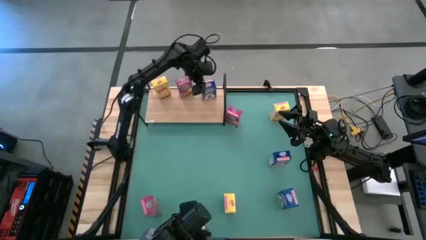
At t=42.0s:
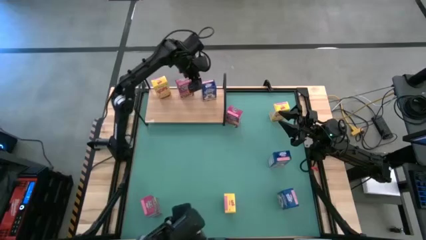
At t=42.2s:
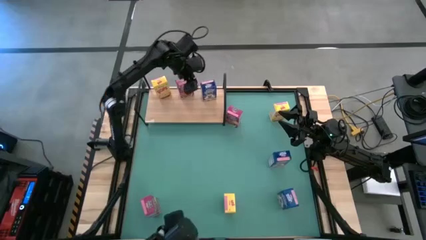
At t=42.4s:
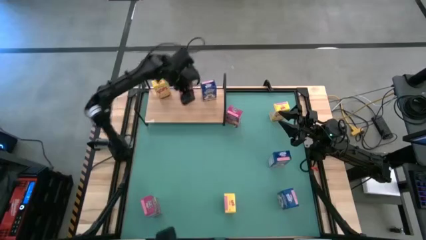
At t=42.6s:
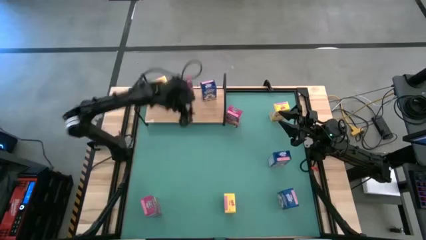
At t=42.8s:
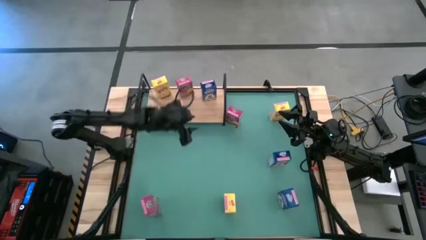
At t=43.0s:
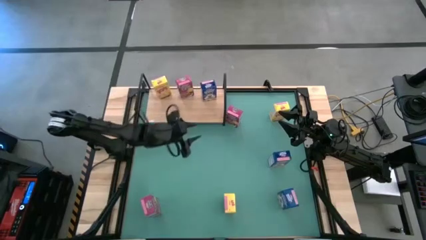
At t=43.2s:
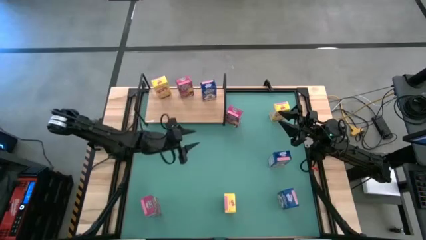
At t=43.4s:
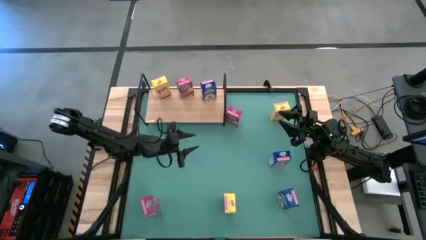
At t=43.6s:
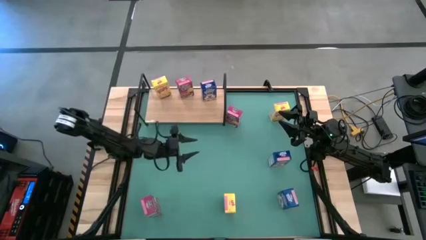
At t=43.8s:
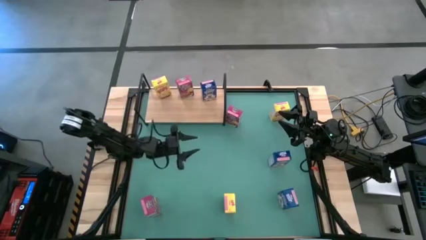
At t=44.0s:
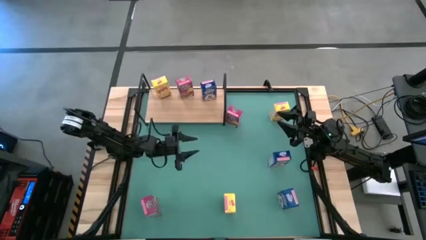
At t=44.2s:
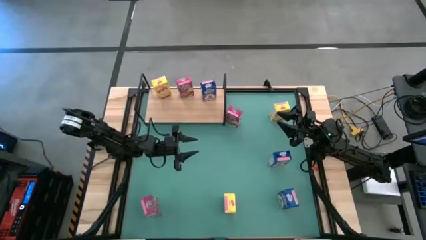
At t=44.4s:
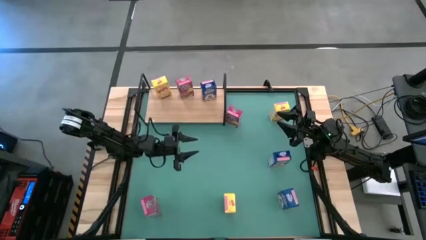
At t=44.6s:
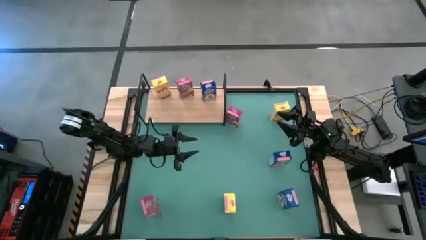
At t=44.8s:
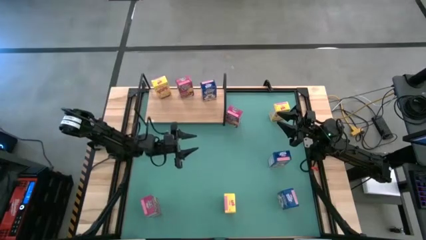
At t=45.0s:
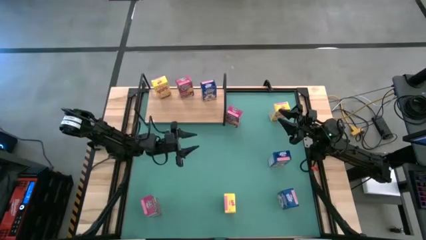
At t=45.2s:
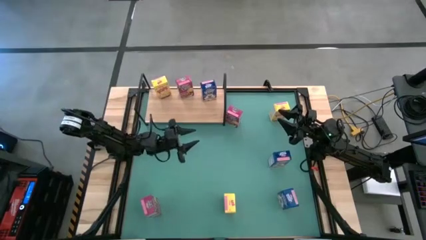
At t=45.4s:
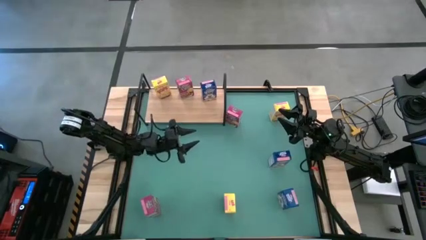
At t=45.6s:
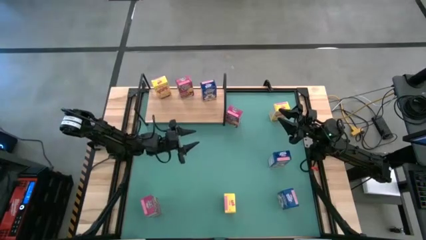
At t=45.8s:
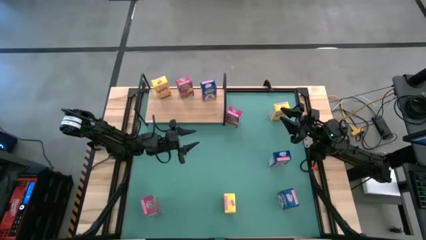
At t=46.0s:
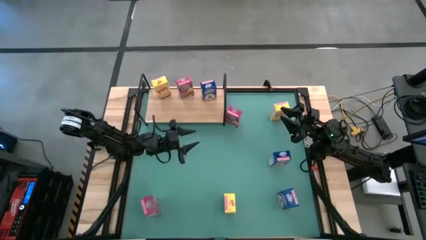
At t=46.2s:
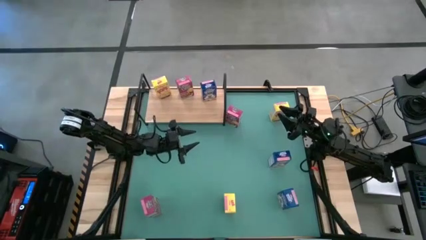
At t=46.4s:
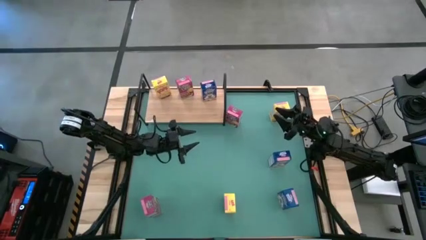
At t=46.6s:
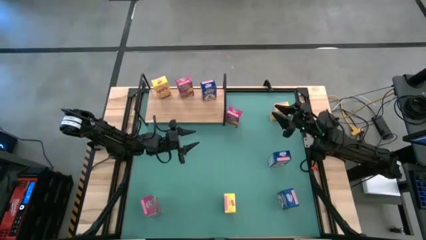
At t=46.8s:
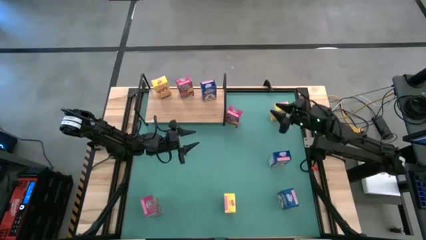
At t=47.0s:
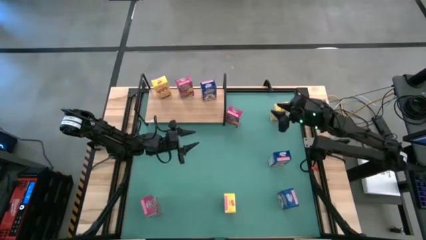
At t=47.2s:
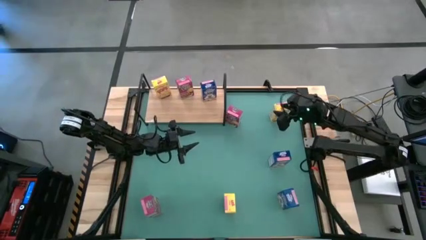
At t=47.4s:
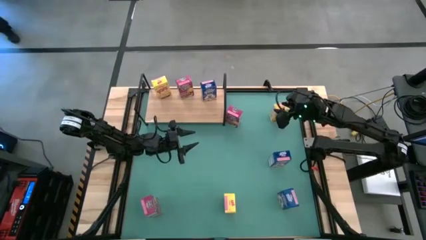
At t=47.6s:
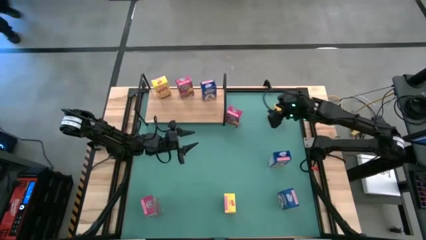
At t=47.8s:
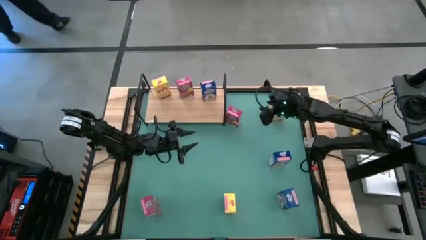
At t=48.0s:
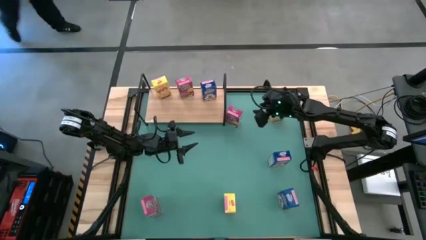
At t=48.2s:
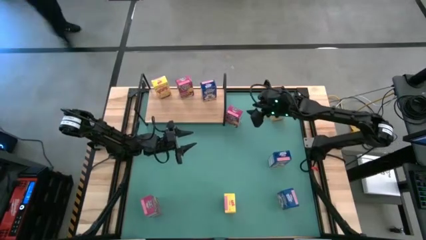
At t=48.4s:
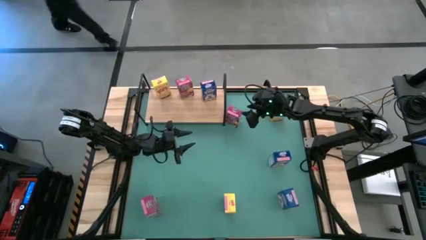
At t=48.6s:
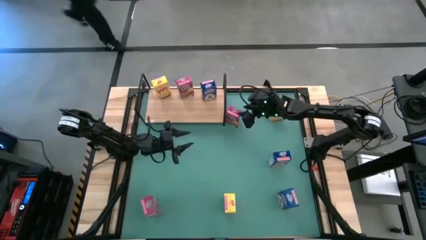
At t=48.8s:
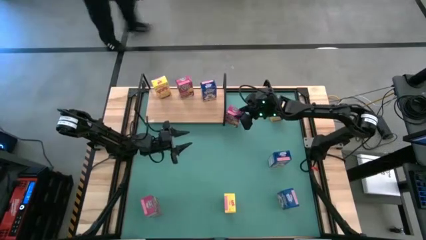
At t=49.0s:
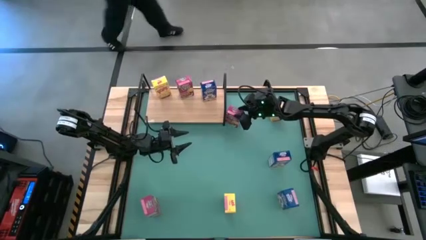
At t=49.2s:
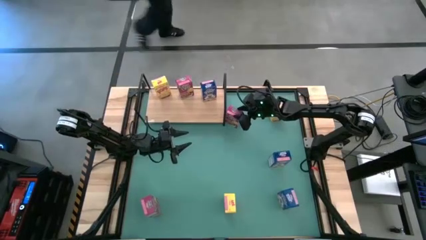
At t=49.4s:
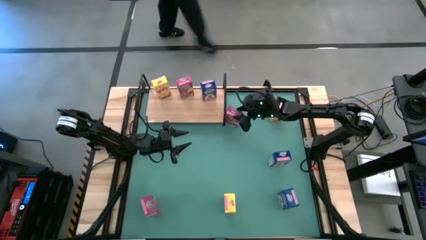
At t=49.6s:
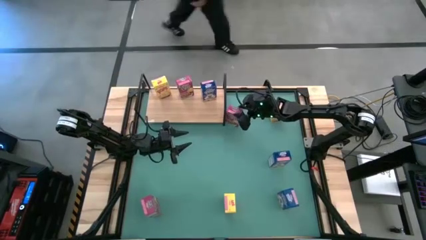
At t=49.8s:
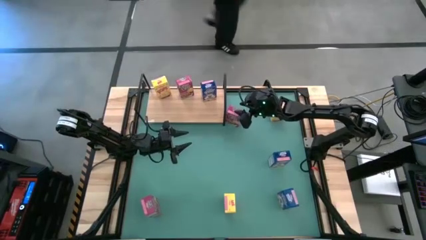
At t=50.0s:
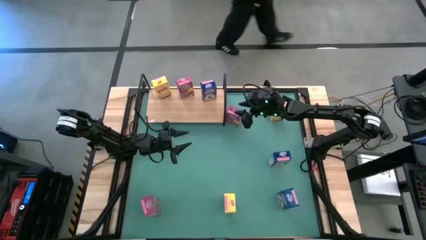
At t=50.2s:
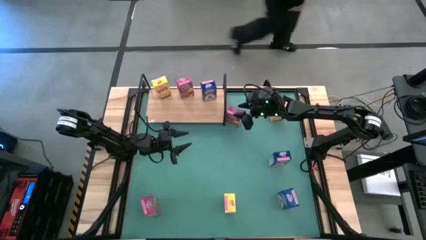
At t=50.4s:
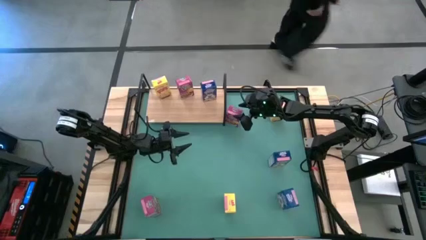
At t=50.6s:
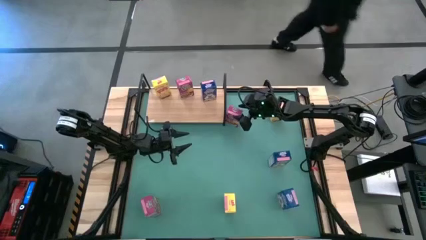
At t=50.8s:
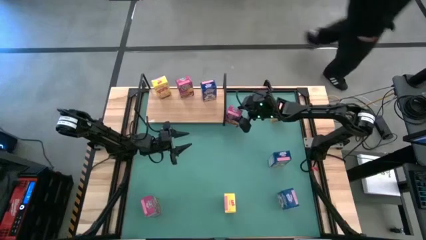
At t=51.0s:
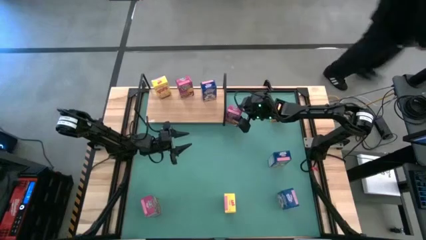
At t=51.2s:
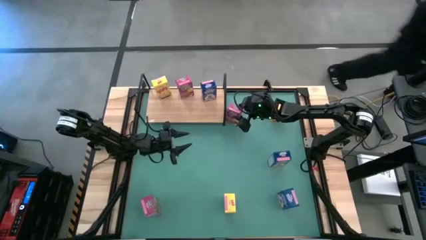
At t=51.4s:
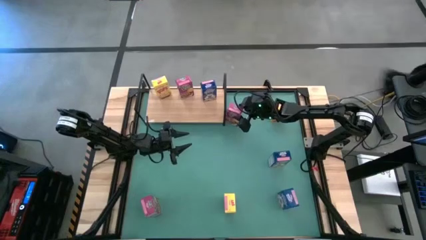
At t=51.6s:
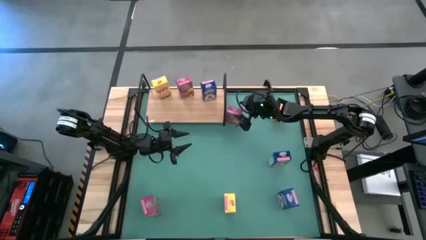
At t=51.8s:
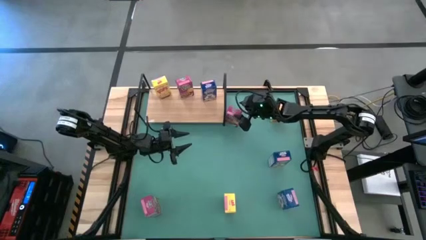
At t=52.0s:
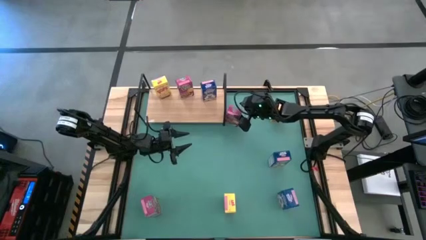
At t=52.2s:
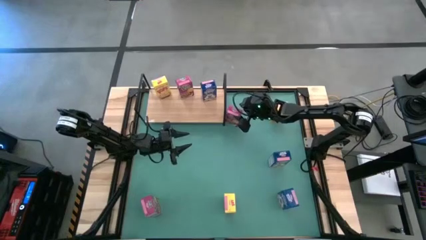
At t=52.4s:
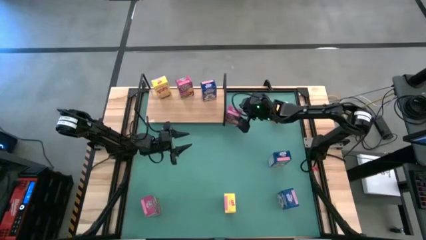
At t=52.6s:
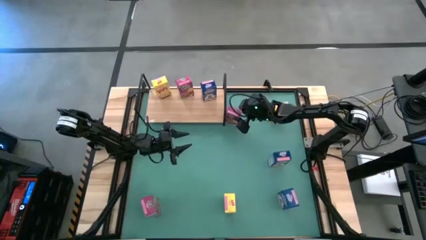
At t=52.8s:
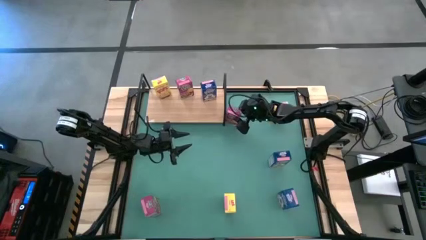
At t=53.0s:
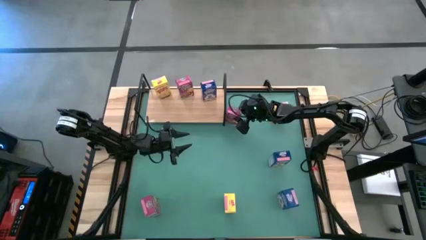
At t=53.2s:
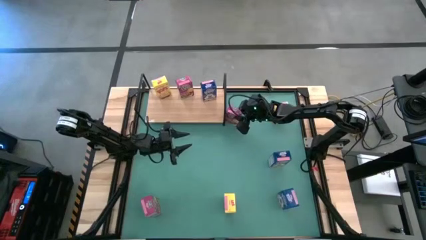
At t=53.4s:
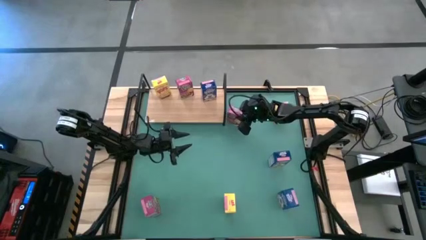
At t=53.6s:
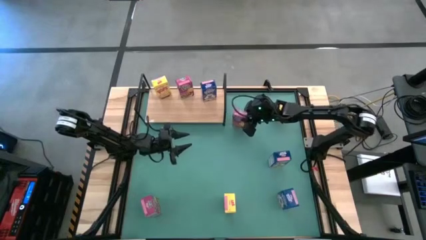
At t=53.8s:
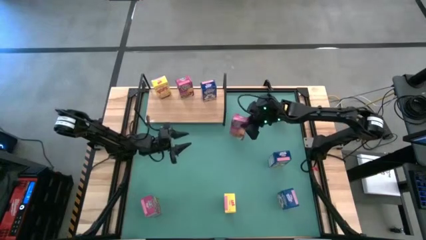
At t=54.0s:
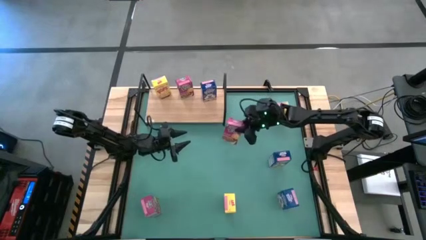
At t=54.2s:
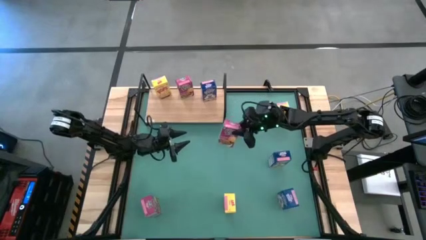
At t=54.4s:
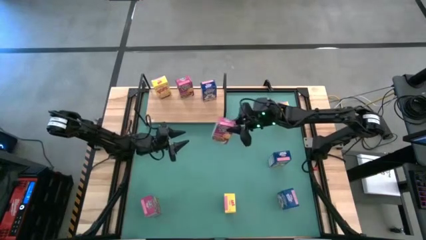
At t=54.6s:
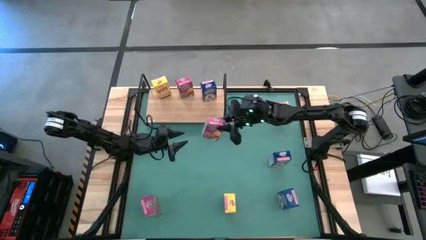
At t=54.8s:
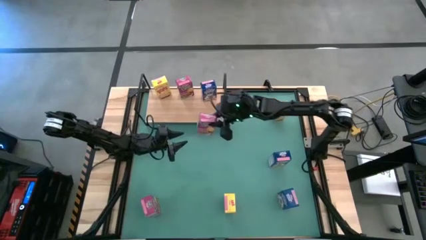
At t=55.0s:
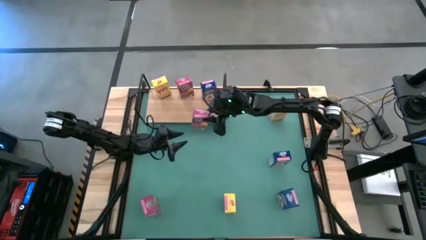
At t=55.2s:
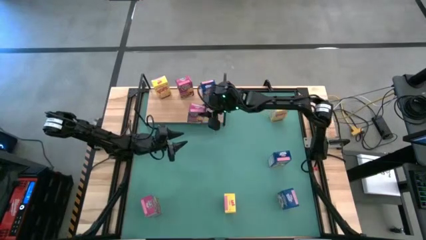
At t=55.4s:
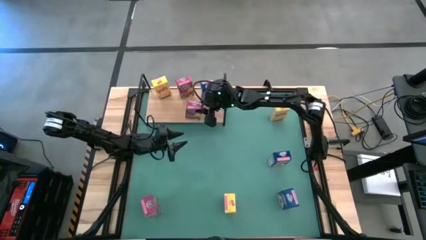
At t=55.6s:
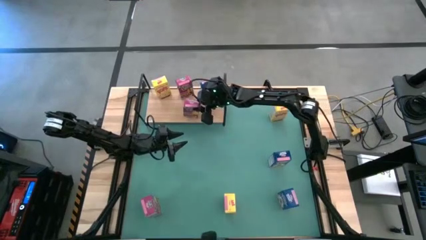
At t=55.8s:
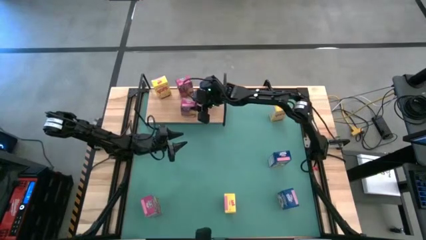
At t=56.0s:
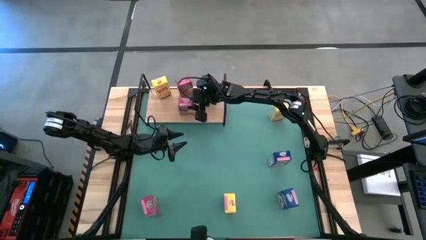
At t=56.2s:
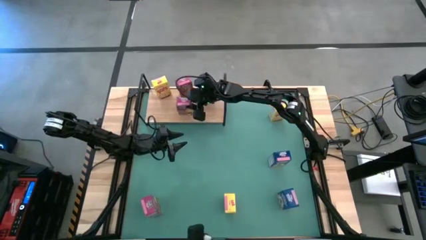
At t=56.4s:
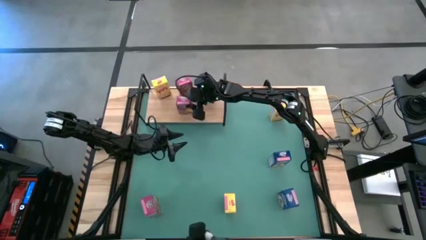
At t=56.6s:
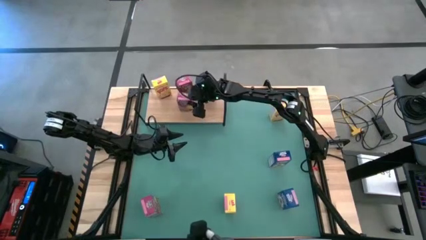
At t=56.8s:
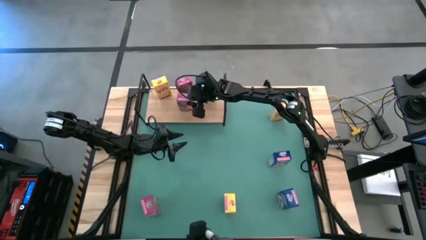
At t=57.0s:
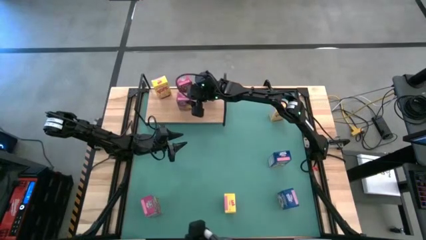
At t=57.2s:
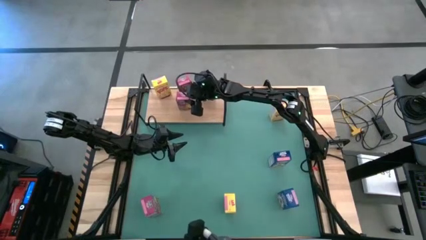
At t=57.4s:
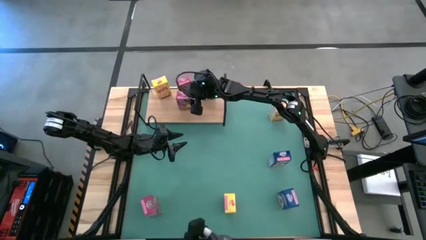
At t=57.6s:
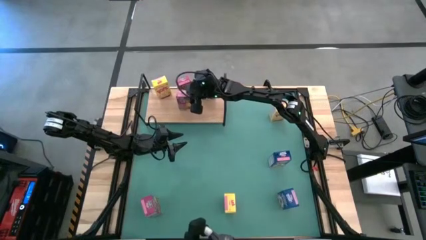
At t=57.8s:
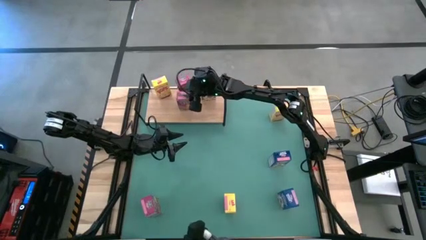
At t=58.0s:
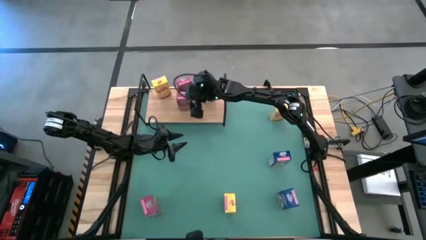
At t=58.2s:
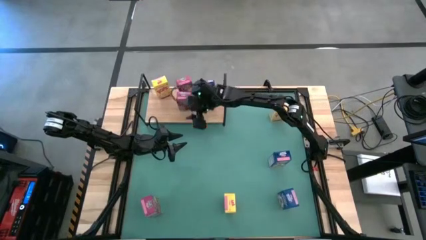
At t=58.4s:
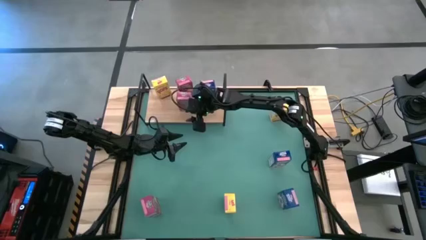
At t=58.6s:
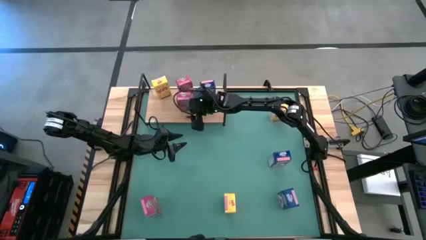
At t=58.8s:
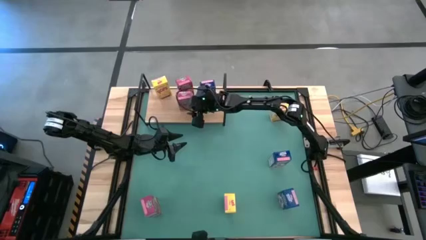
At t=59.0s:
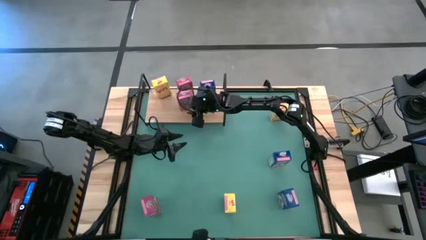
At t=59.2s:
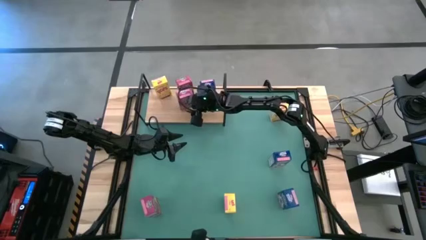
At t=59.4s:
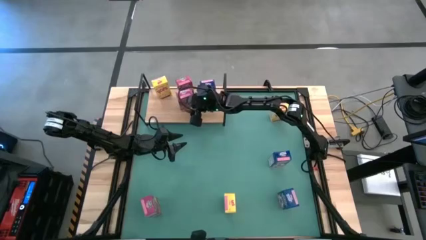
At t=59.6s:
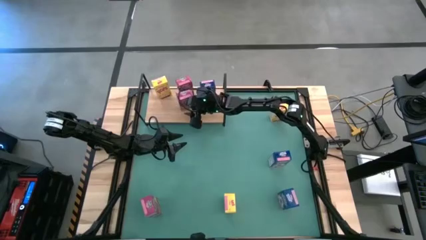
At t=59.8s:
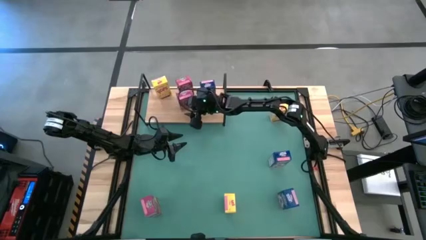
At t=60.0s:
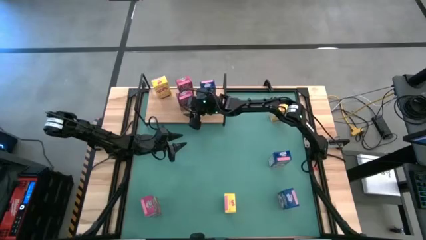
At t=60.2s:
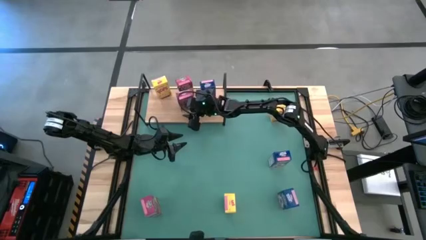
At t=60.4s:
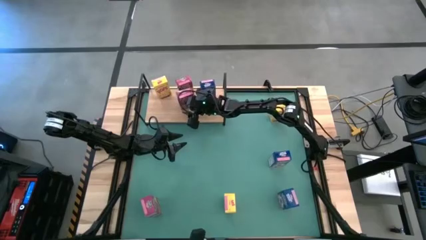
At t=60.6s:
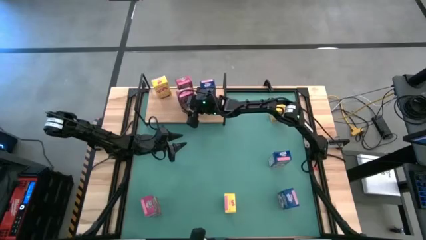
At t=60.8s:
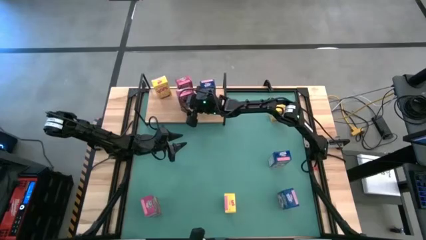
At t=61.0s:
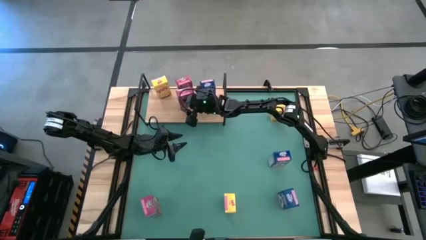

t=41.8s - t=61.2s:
Task: Stack cereal on shelf
Put the top pink cereal box on the shelf aligned with the other pink cereal box
